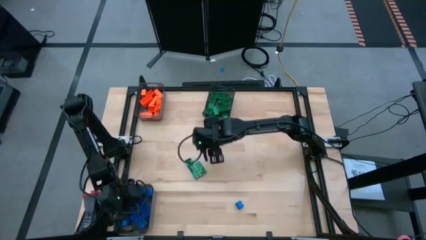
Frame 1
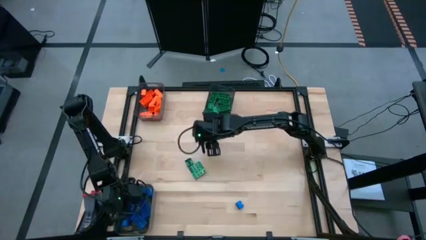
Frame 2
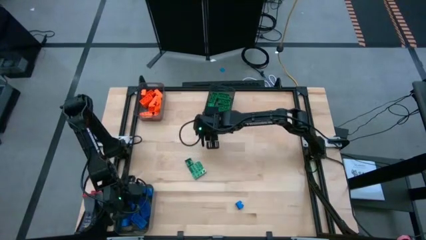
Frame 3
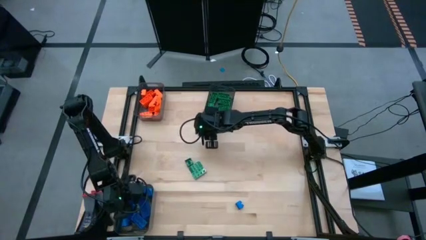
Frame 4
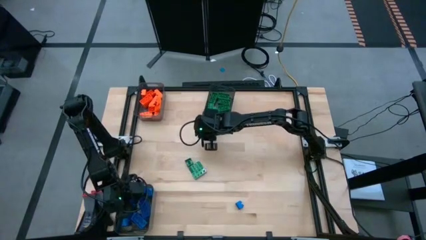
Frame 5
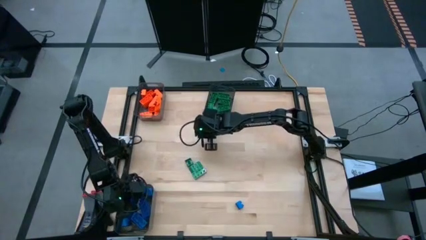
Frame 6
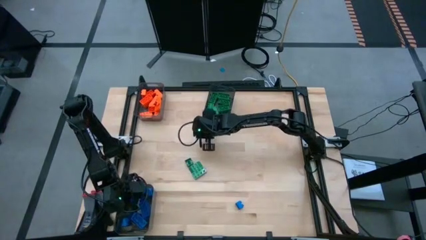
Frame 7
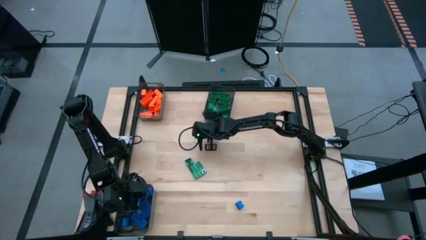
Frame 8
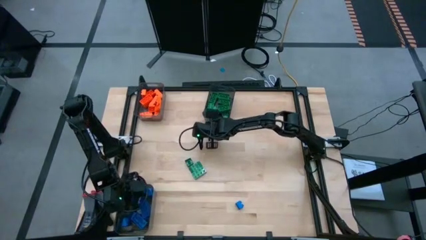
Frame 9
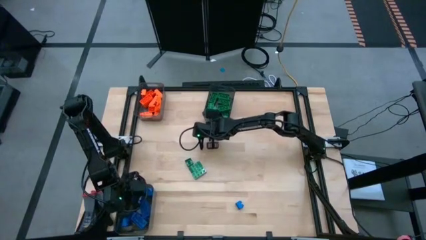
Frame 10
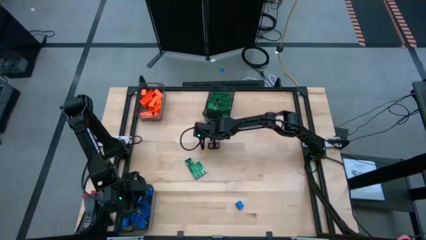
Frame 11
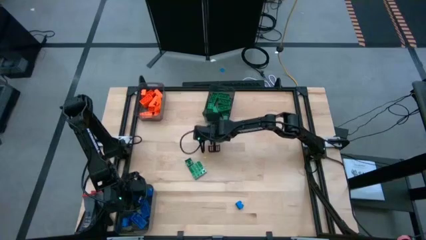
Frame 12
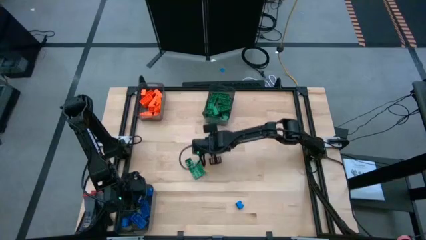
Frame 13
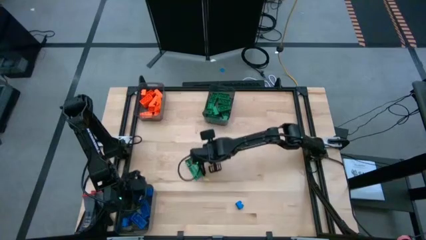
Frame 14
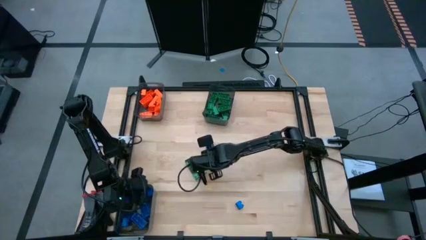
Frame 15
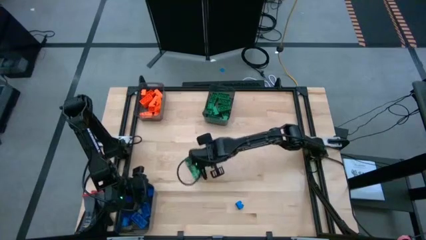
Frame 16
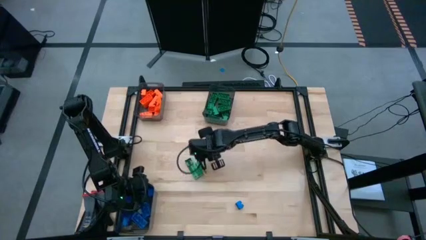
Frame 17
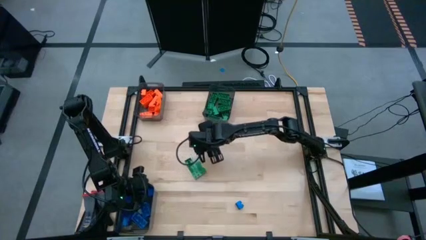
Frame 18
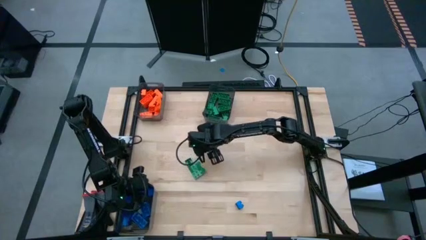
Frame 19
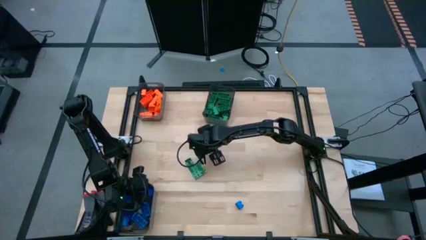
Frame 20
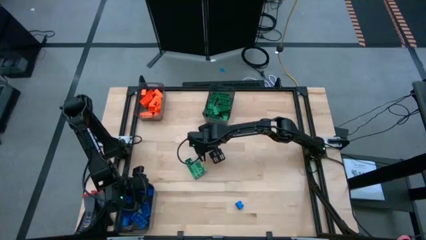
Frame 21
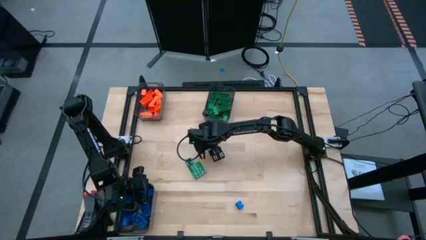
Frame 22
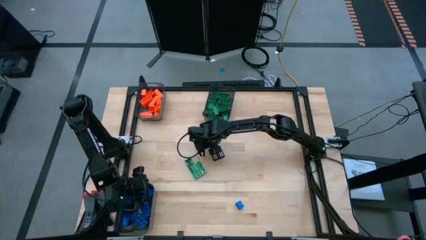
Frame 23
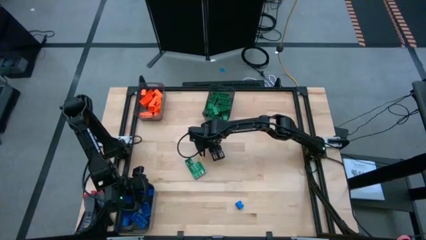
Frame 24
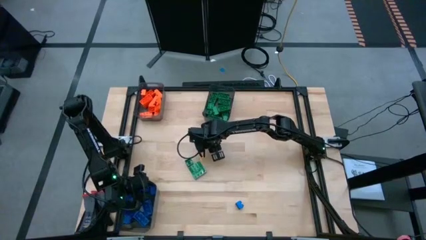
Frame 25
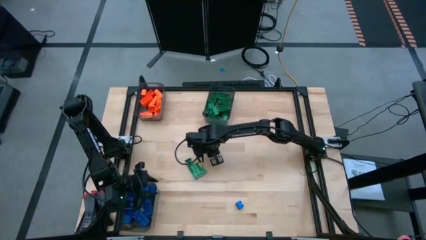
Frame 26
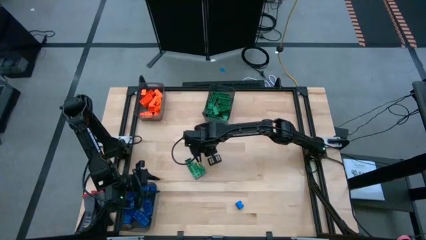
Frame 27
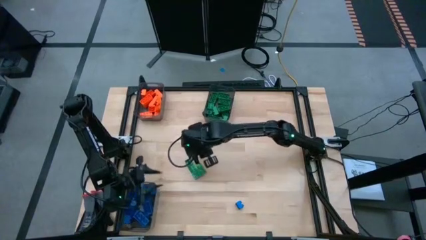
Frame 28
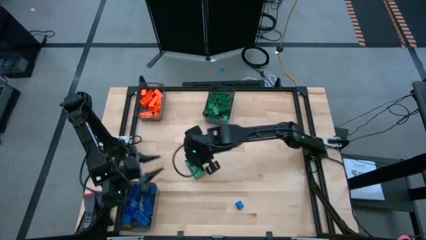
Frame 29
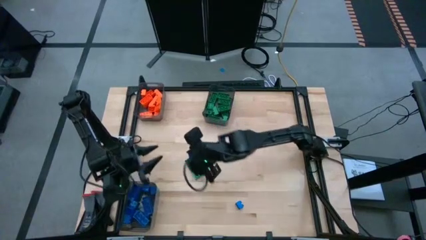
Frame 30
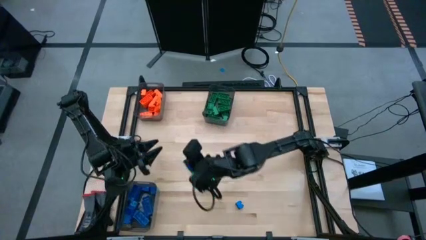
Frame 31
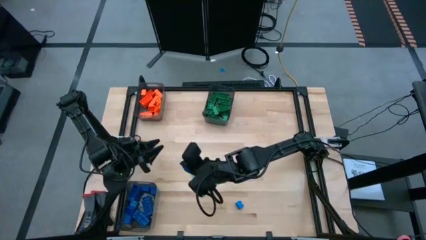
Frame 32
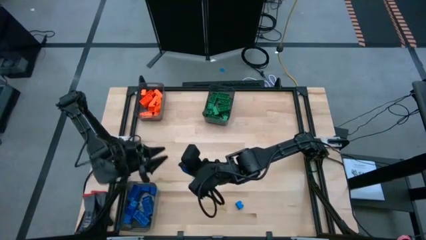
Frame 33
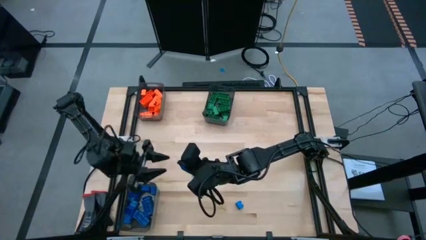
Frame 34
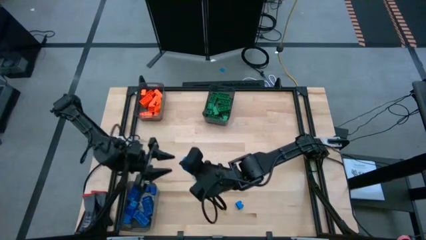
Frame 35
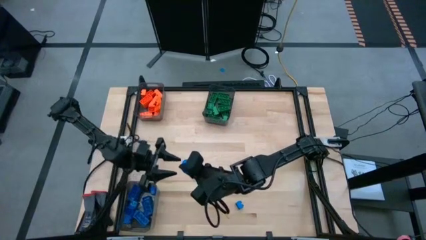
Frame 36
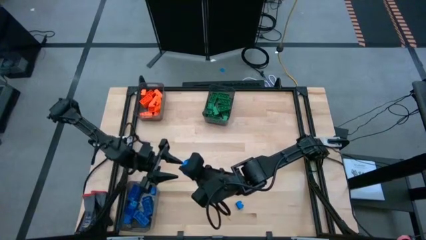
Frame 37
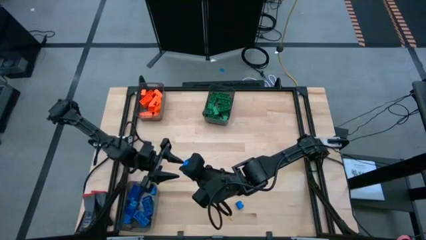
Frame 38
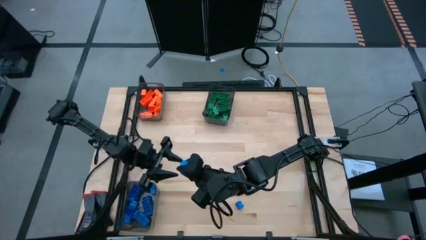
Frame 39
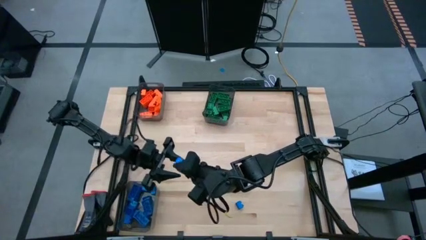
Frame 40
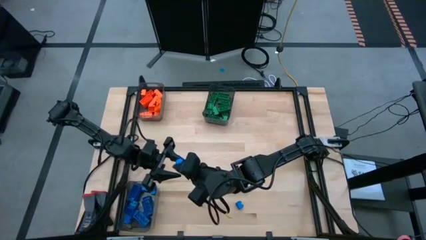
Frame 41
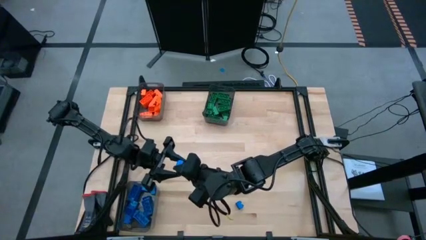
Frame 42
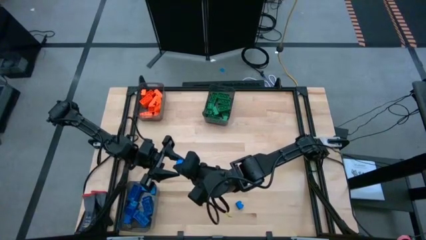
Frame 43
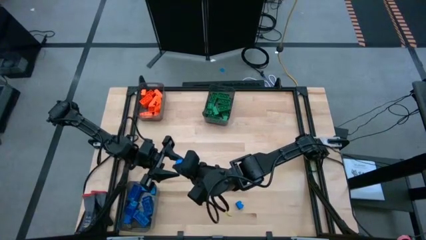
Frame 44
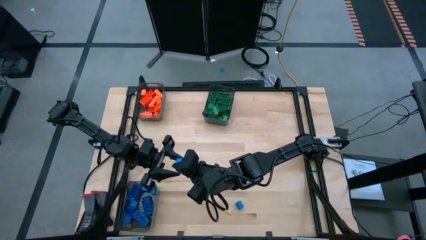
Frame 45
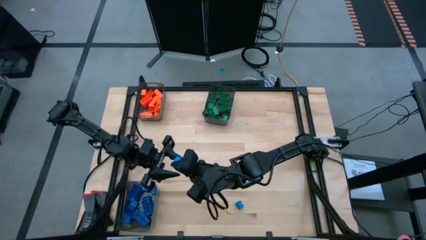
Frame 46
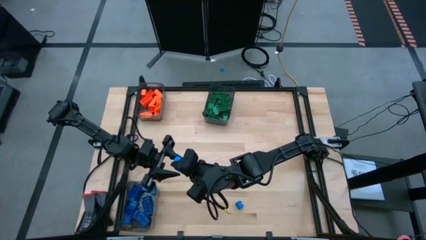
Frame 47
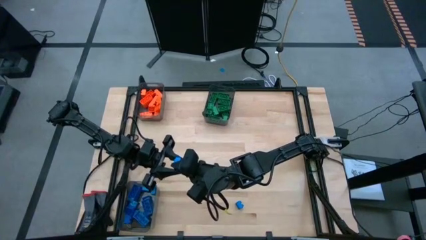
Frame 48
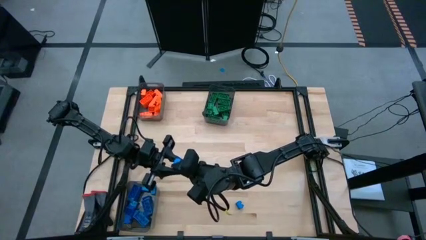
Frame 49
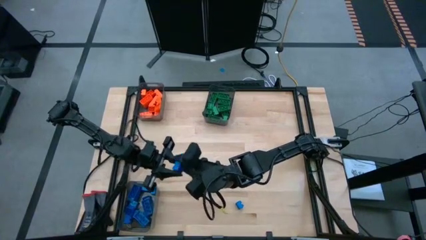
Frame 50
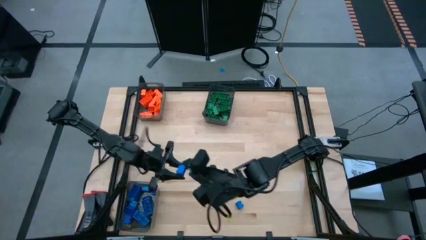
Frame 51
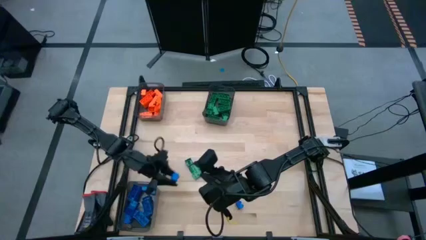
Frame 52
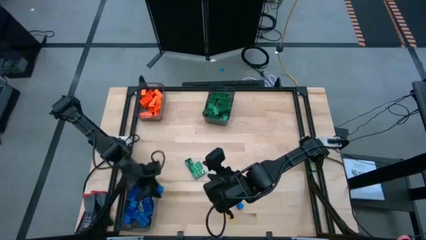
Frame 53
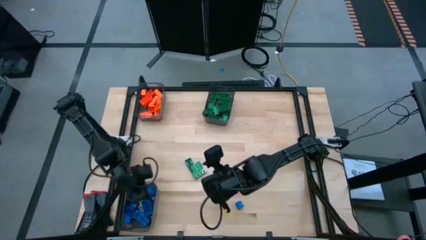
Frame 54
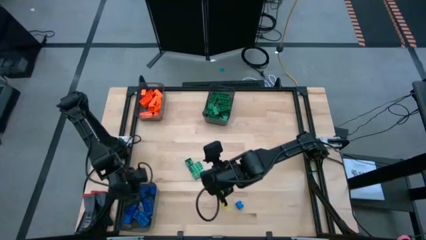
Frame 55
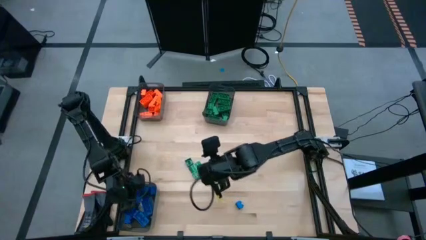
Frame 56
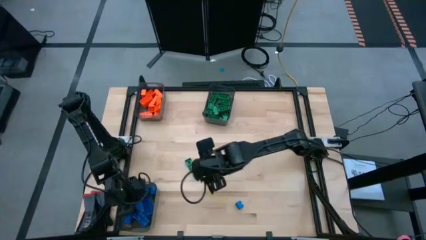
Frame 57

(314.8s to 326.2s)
Task: Sort blocks
Put the blue game piece into the bottom left black transparent bin

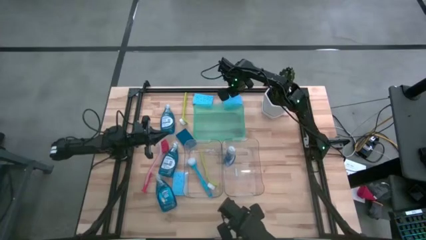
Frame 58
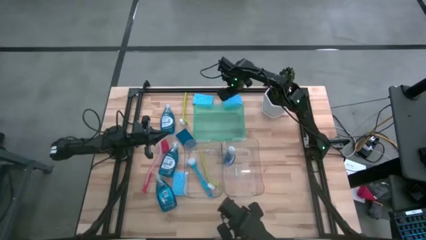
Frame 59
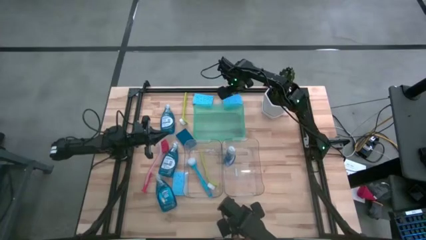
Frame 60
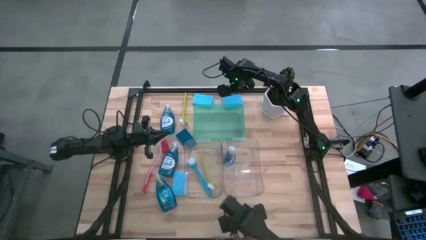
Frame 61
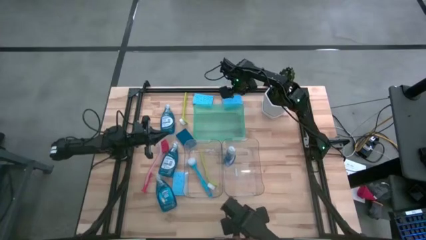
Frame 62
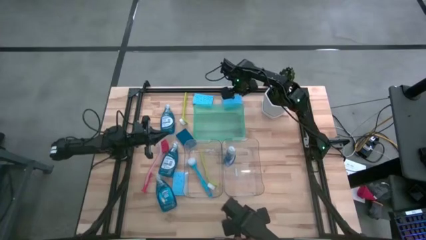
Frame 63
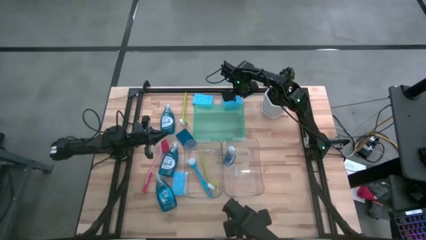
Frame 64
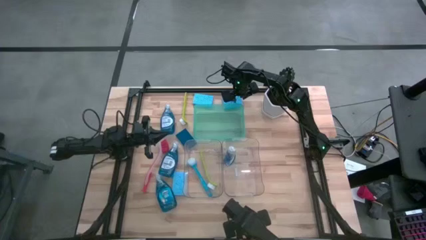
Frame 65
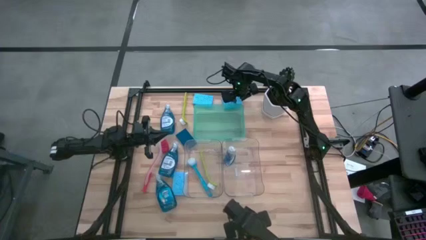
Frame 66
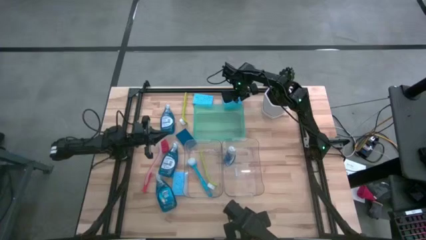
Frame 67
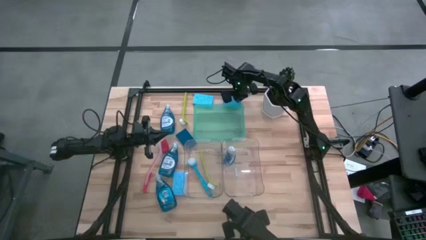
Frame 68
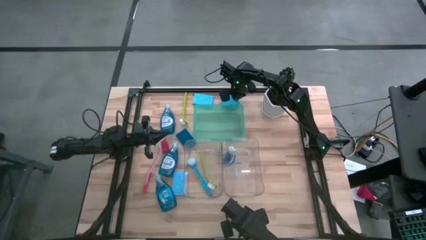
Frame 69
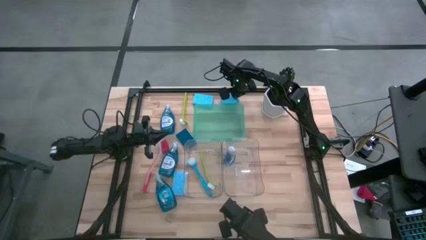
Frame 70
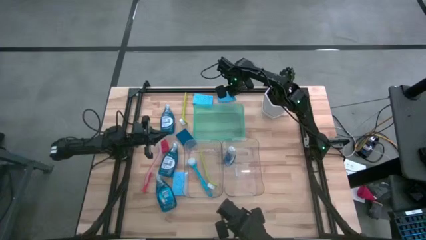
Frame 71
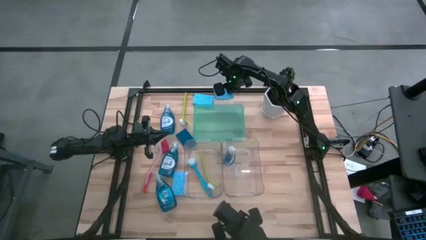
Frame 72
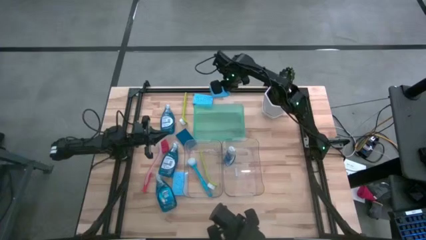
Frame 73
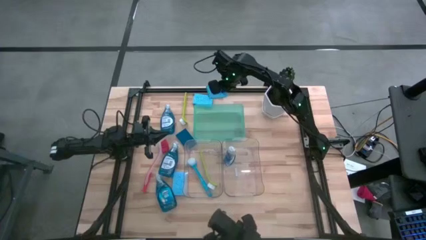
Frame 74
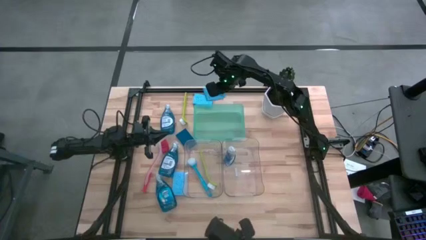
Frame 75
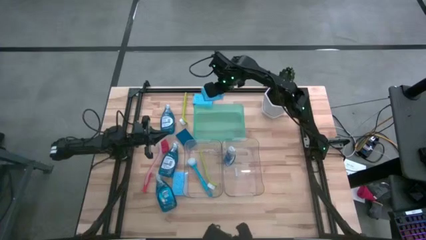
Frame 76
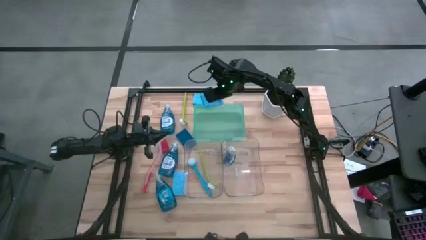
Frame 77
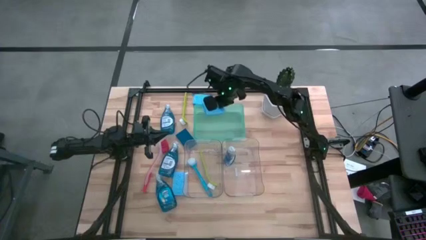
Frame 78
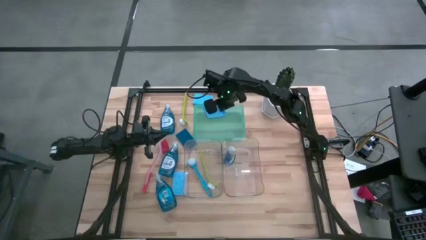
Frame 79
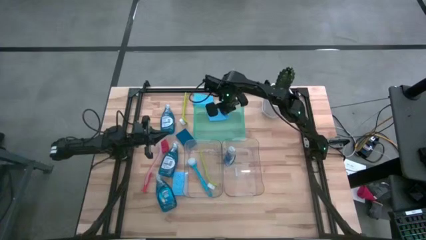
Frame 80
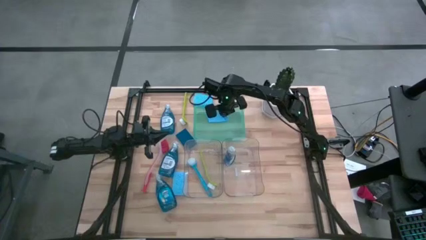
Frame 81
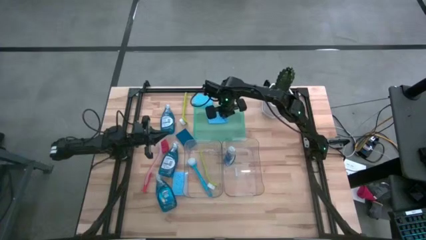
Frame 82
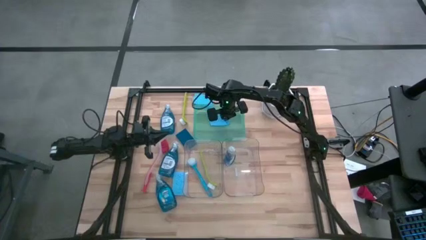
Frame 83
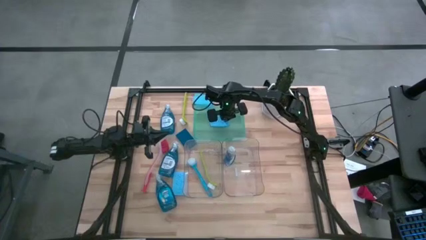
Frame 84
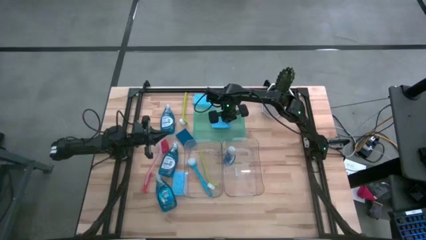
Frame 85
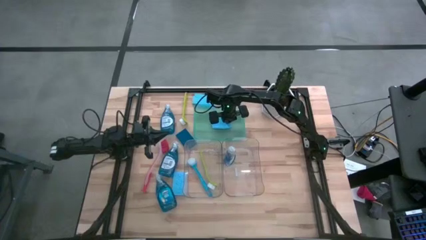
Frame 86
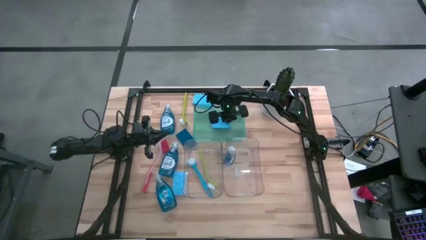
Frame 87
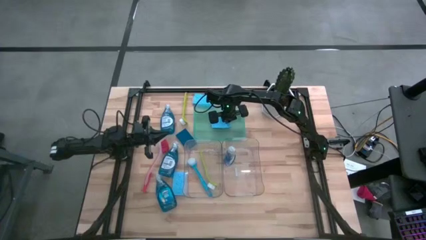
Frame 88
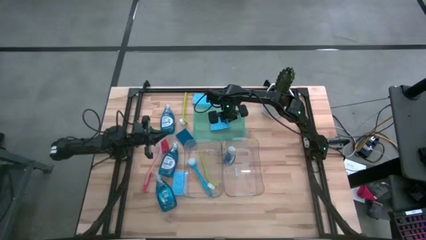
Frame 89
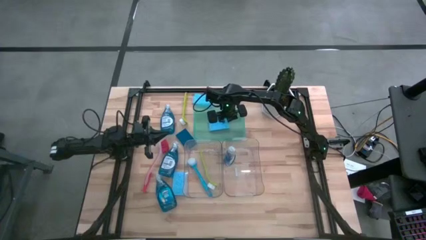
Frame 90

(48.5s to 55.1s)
Task: Pick & Place Kitchen Sink Supplies
Put the blue sponge into the green bin
